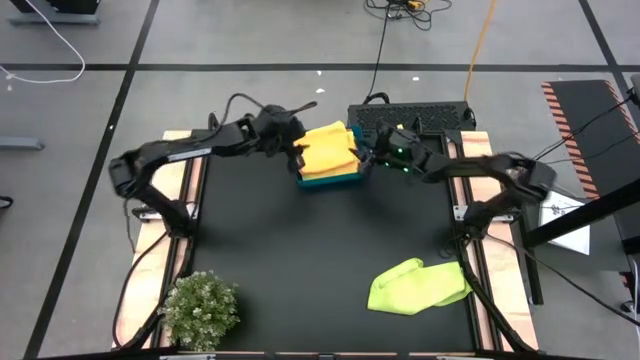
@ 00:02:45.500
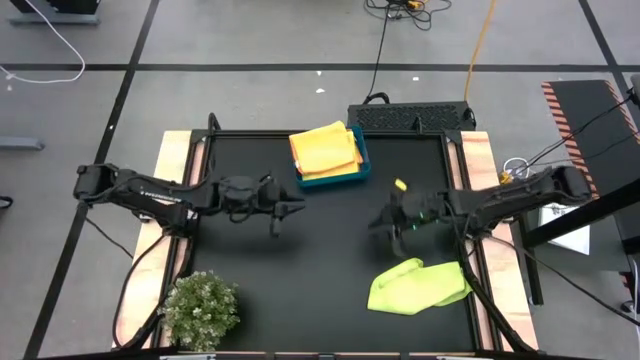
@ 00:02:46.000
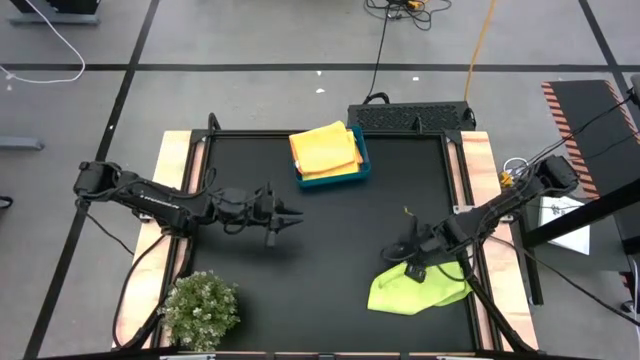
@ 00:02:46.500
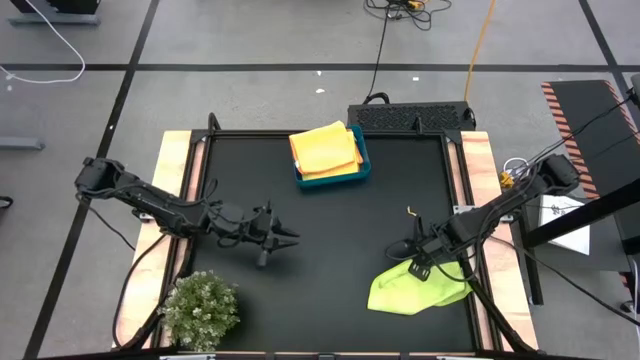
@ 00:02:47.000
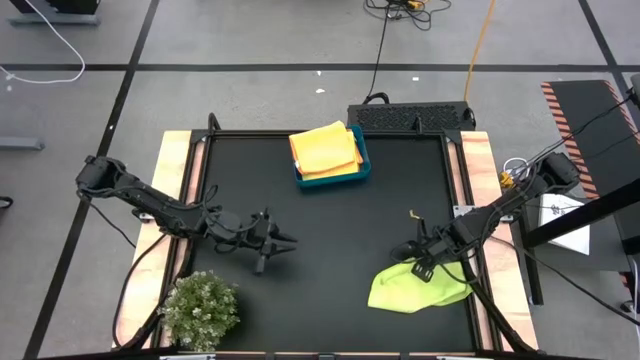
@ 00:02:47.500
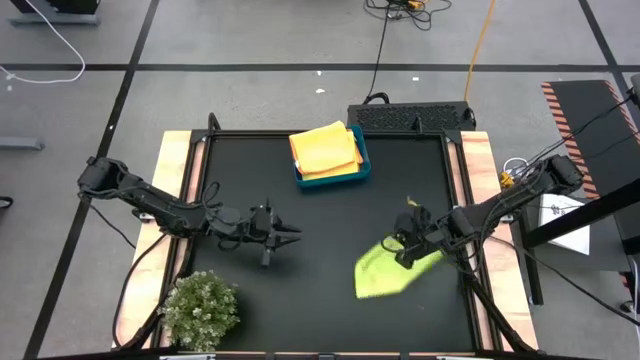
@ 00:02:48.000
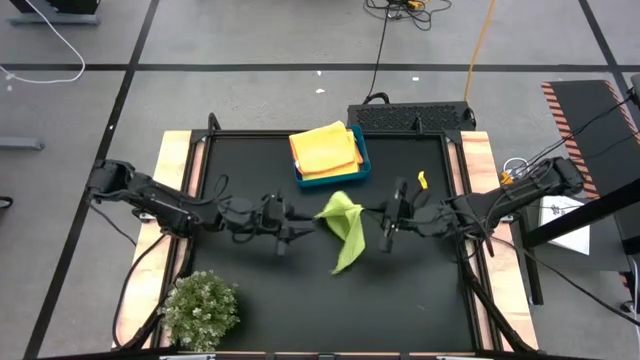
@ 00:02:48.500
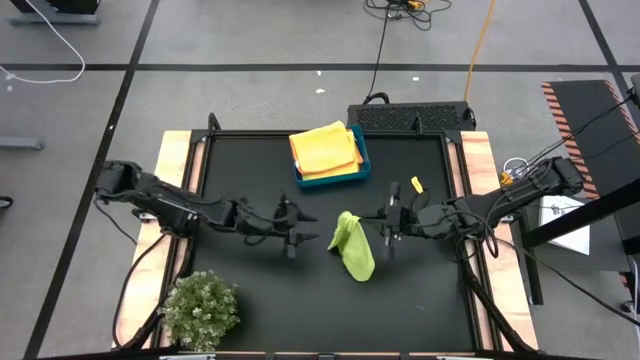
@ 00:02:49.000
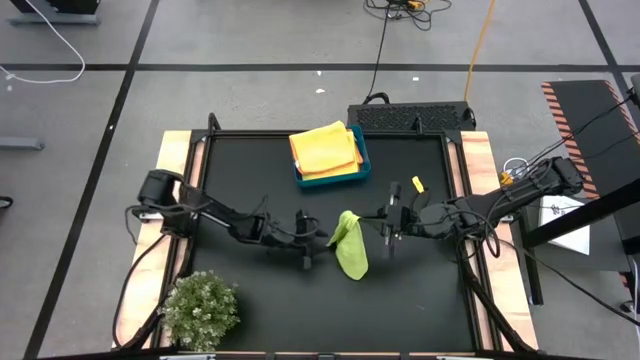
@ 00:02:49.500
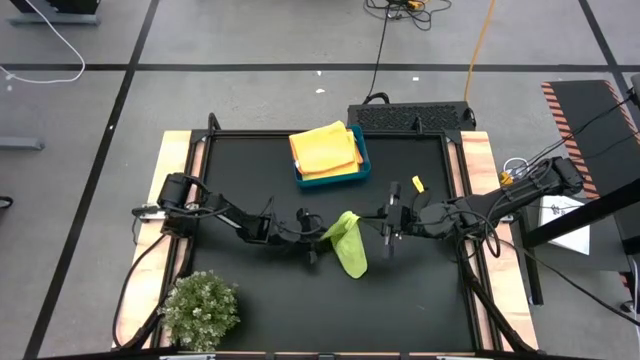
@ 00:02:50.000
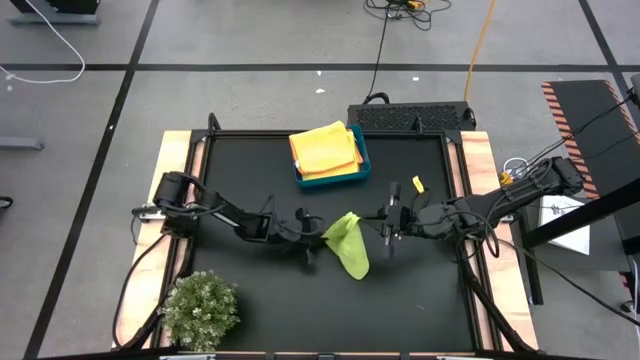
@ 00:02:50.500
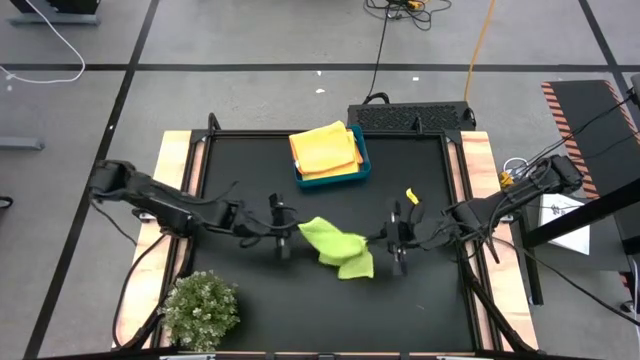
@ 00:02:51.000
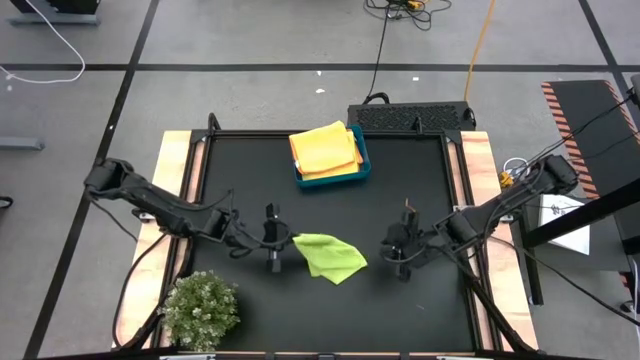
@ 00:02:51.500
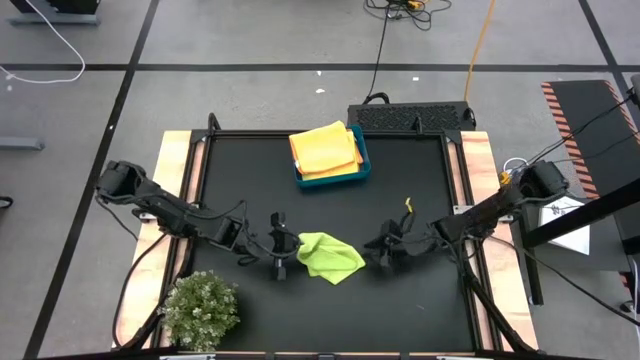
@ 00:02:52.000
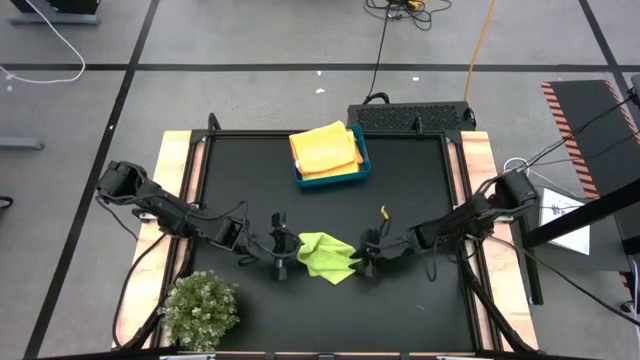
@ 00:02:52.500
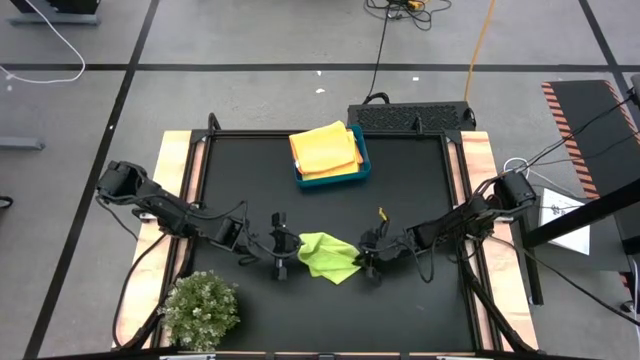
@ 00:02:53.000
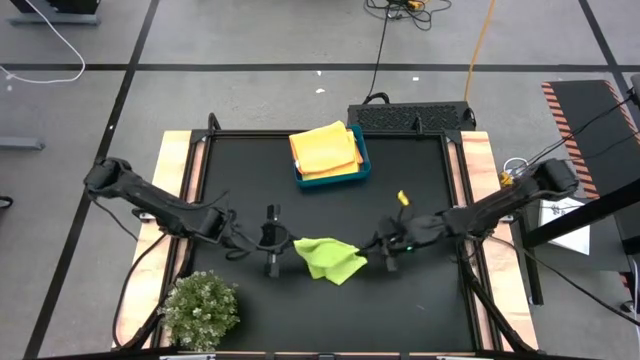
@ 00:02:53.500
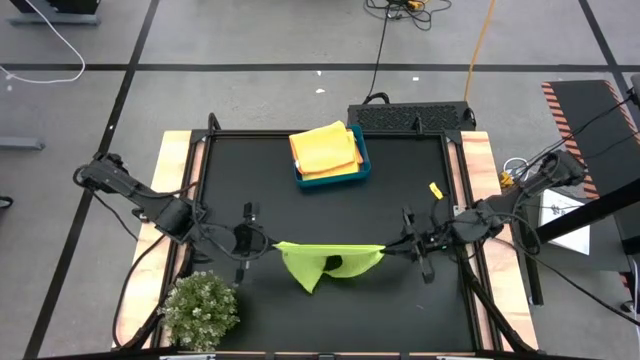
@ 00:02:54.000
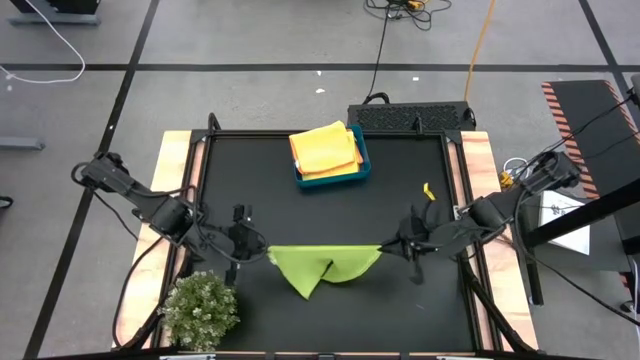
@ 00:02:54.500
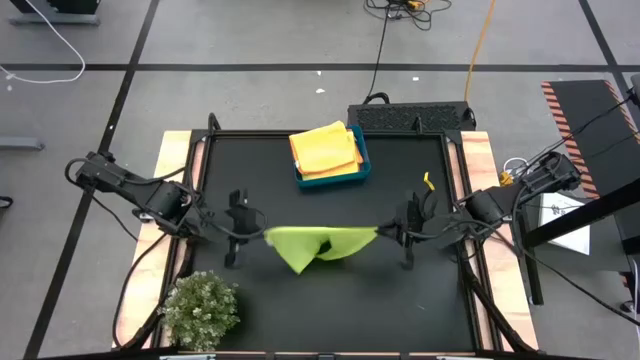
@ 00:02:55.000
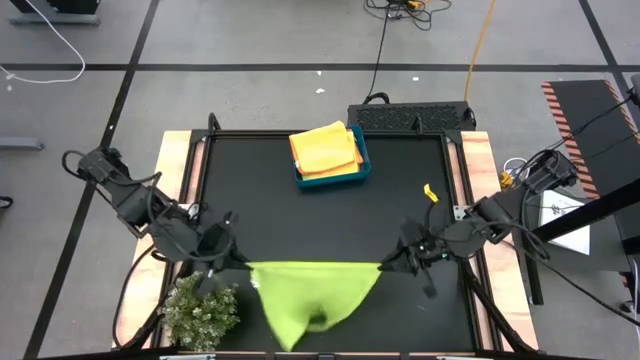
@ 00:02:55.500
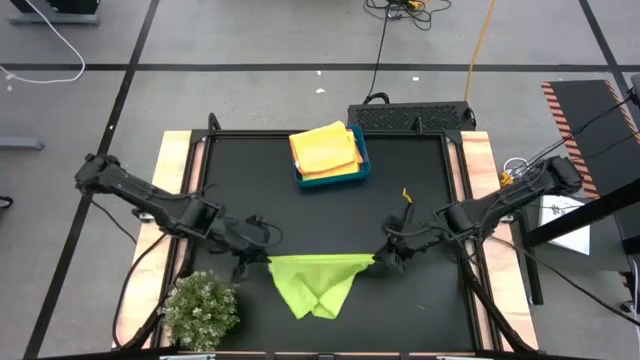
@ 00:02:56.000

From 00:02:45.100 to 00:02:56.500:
Task: Fold microfiber towels
Fold the green microfiber towel

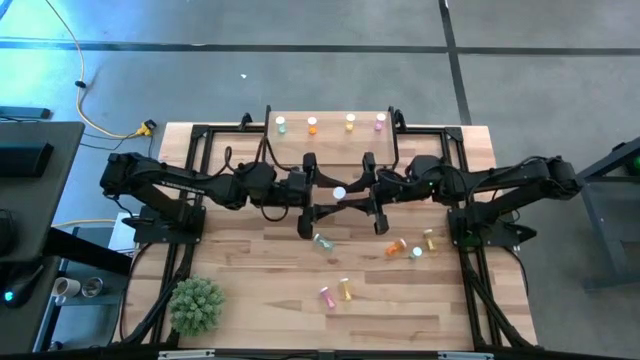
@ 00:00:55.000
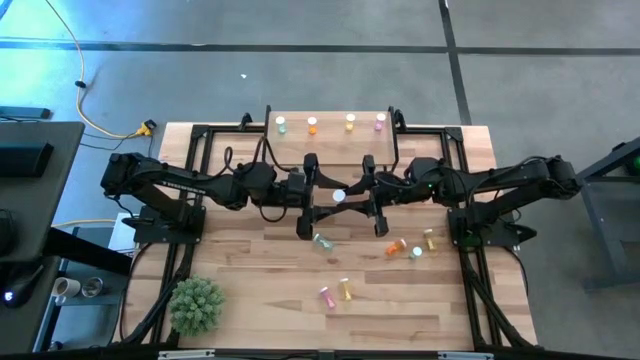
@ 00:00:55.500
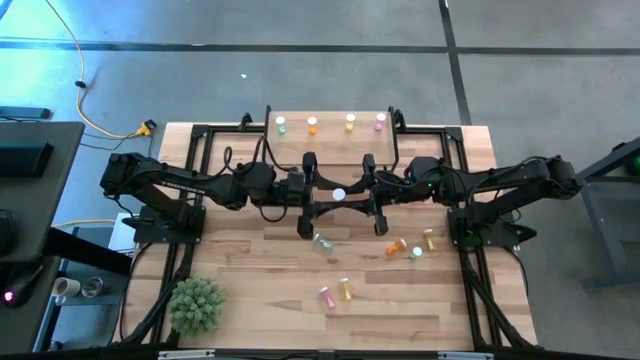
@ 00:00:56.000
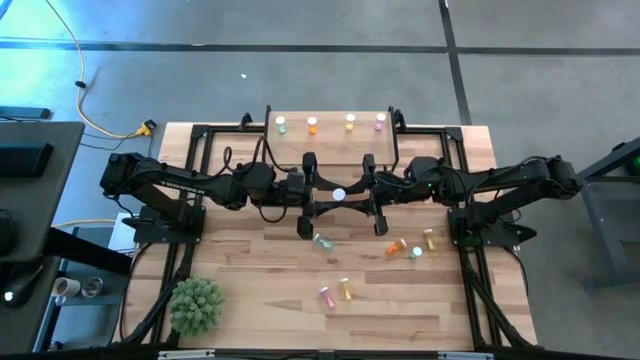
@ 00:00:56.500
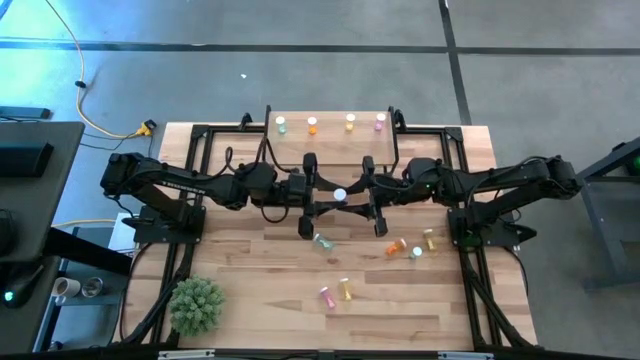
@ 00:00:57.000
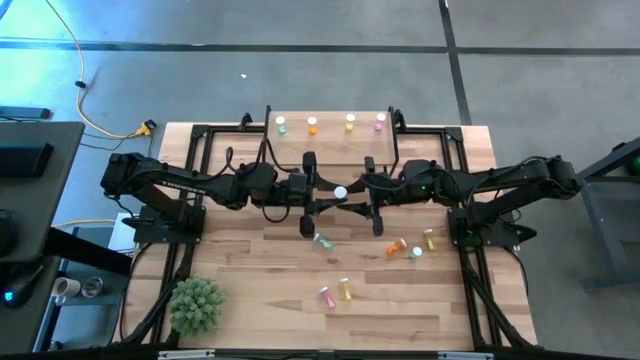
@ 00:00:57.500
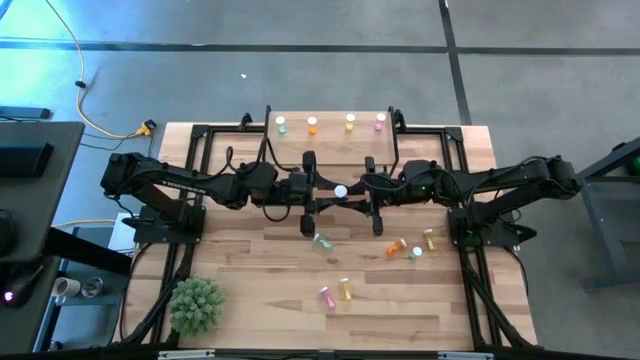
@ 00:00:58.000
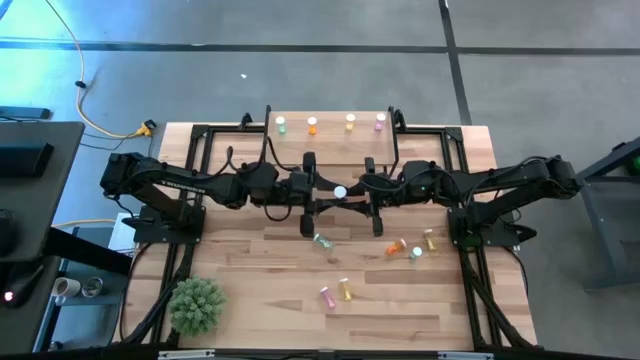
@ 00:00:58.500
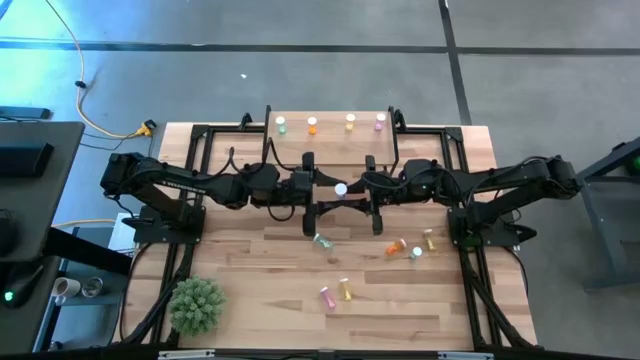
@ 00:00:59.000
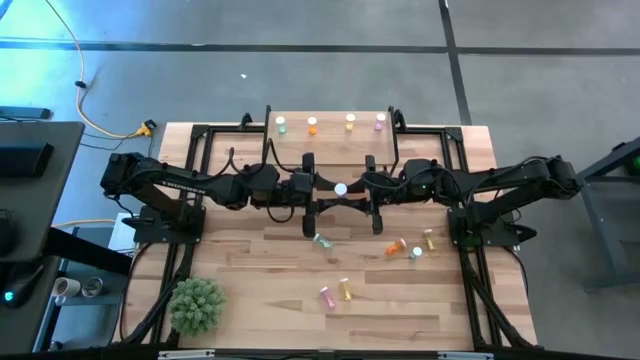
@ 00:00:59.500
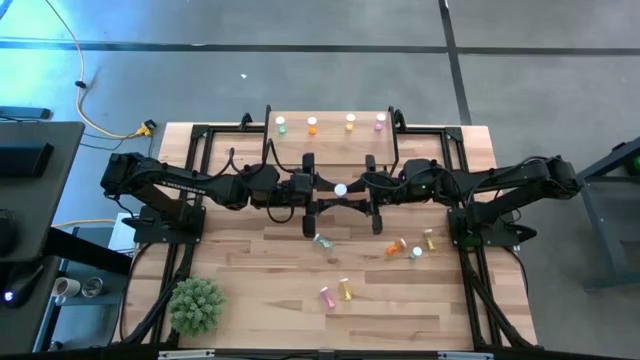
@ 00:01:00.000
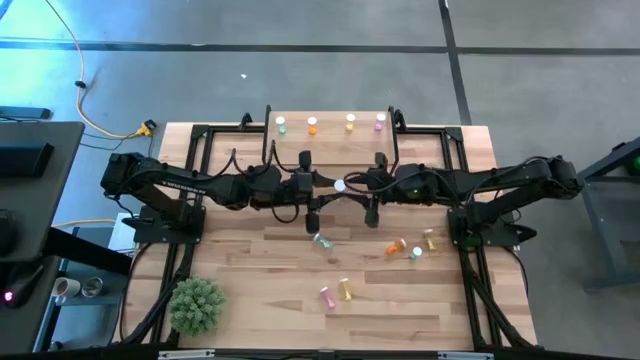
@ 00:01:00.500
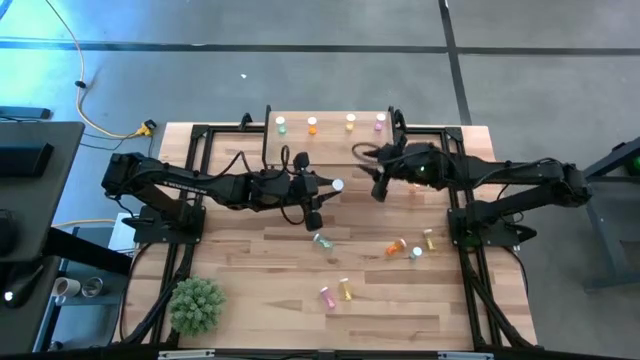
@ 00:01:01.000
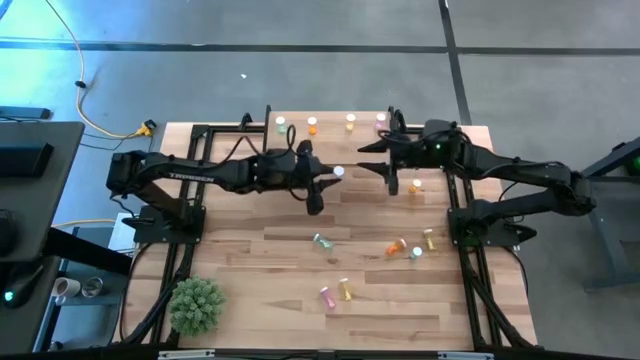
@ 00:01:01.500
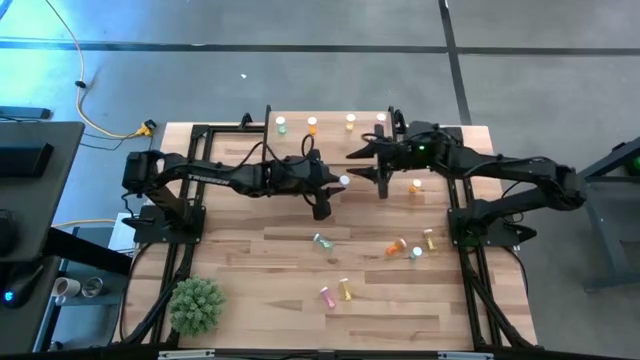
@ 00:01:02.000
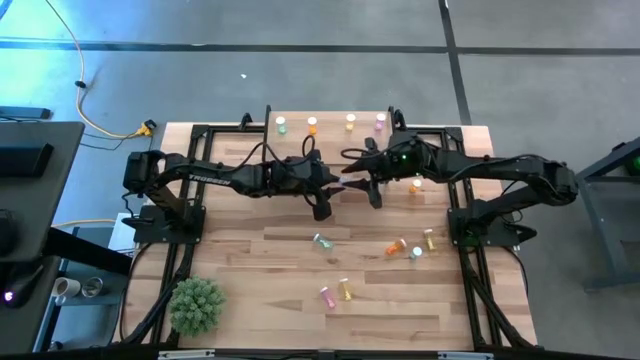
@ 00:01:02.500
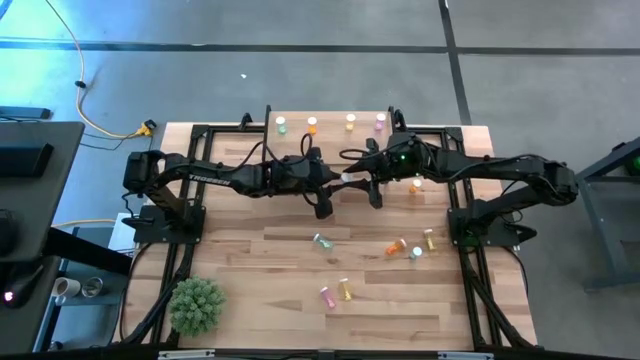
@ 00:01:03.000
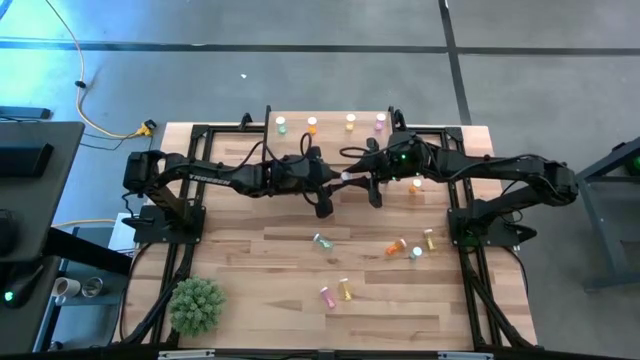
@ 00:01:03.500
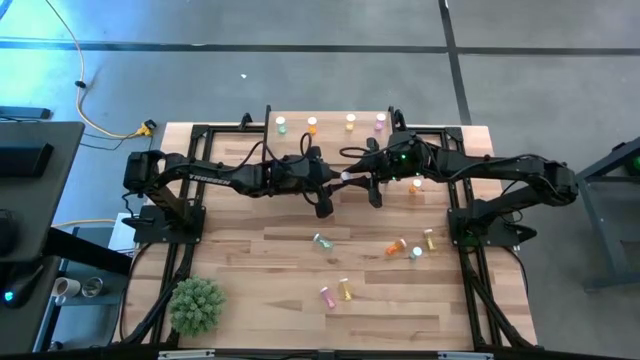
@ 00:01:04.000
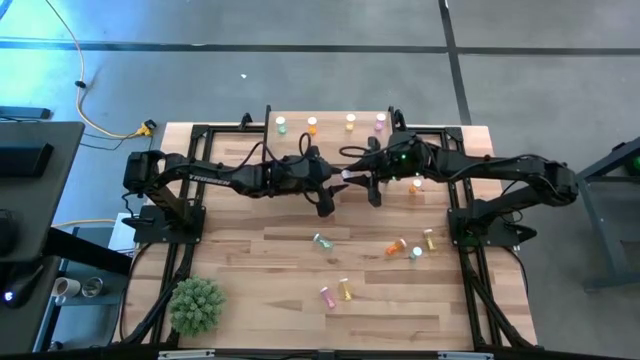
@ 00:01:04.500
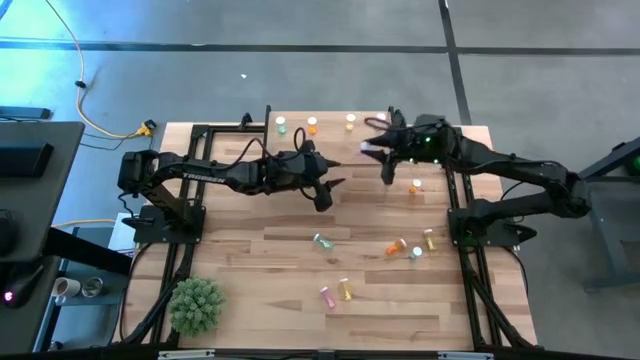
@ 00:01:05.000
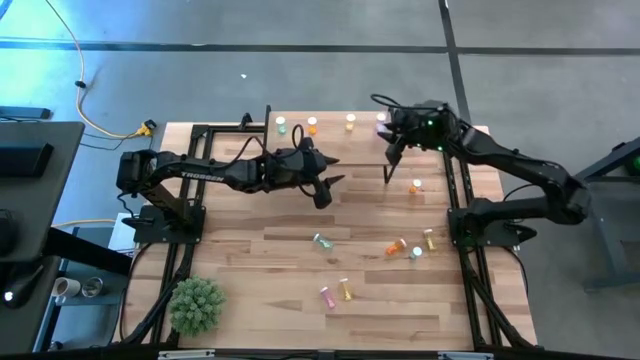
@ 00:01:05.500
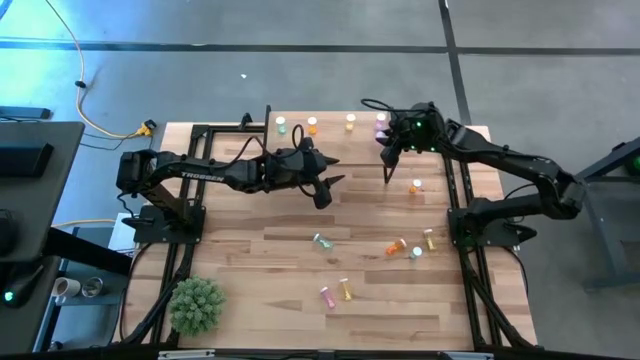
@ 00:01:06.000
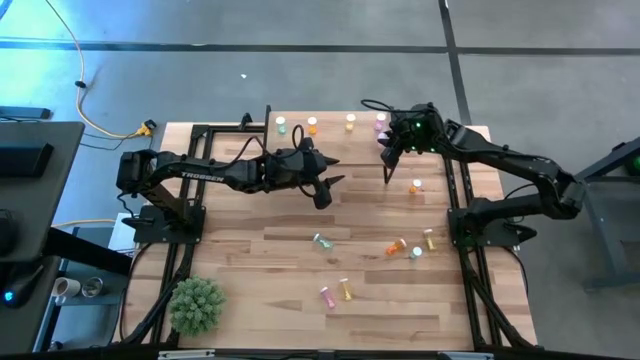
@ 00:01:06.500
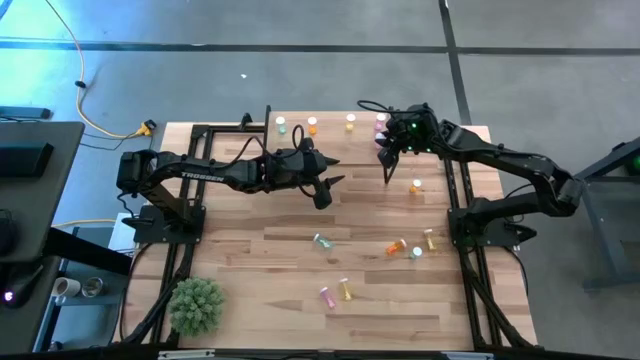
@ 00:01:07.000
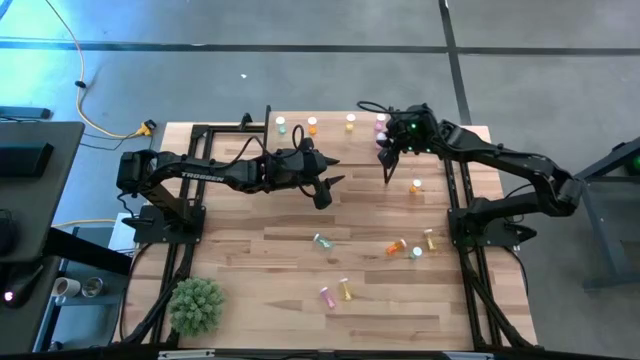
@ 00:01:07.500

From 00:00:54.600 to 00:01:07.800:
Task: Pick and place medicine bottles onto shelf by color
Put the top violet pill bottle on the shelf aligned with the other violet pill bottle
